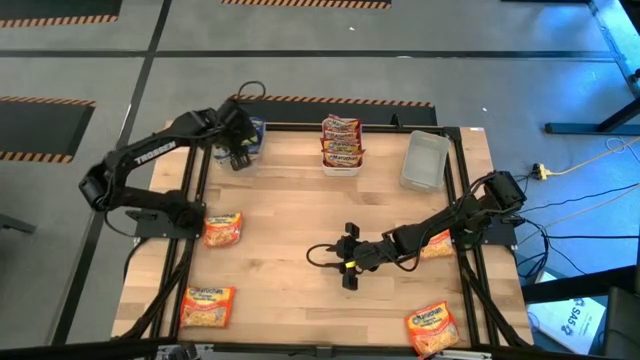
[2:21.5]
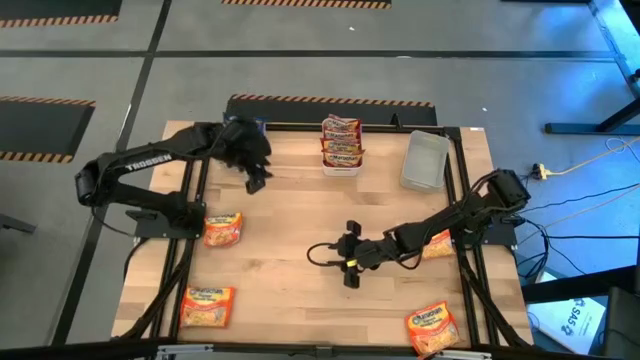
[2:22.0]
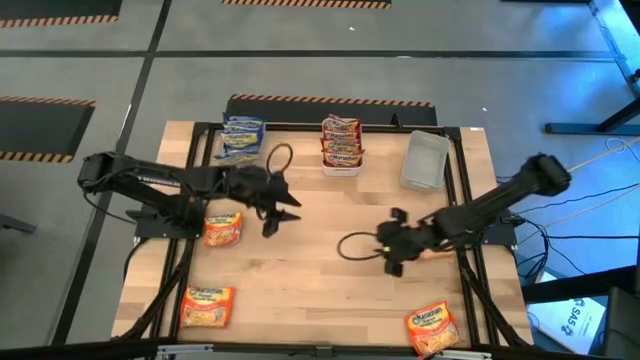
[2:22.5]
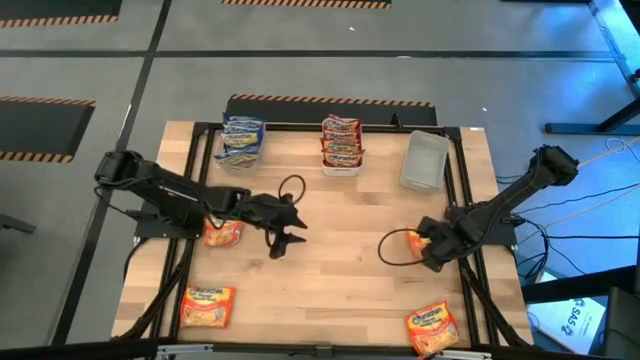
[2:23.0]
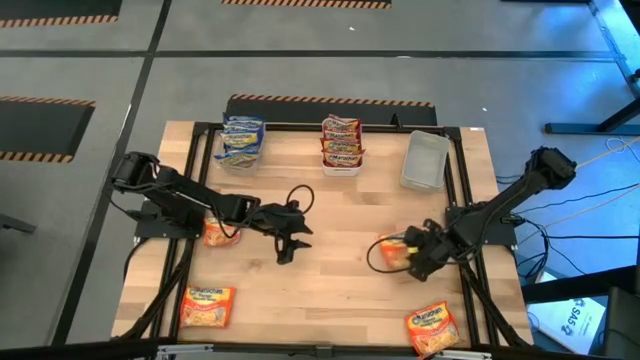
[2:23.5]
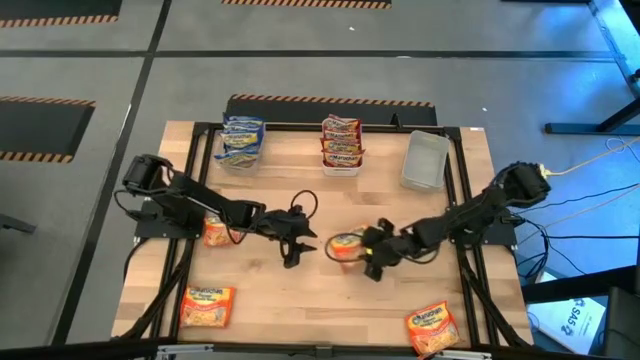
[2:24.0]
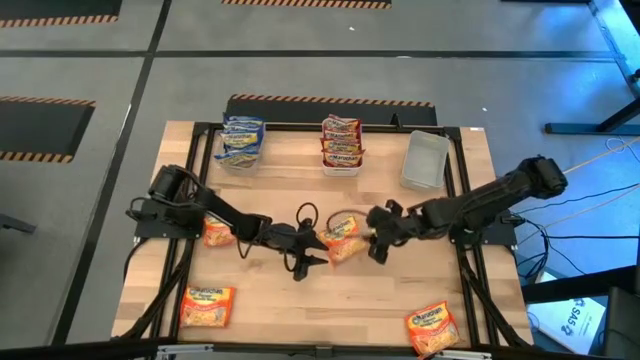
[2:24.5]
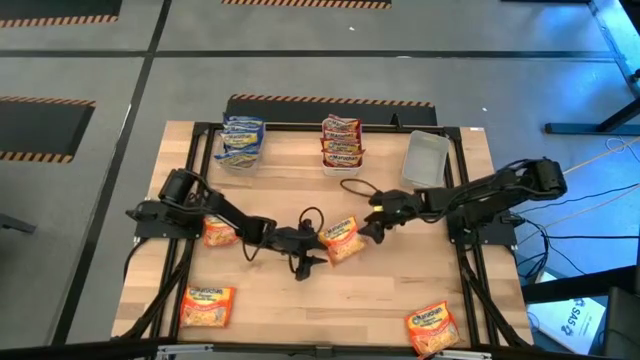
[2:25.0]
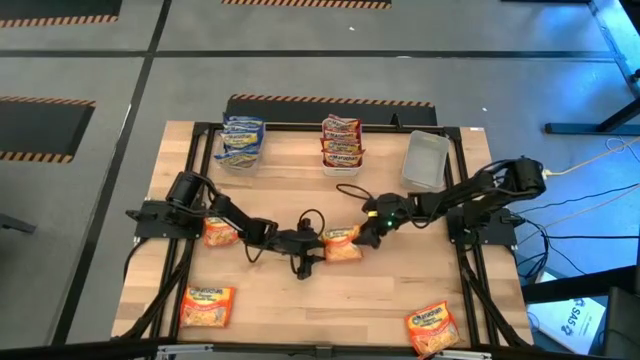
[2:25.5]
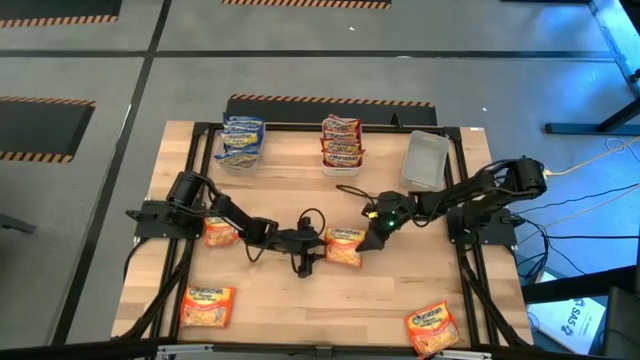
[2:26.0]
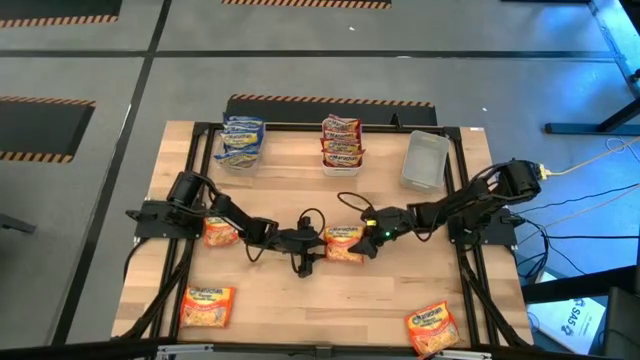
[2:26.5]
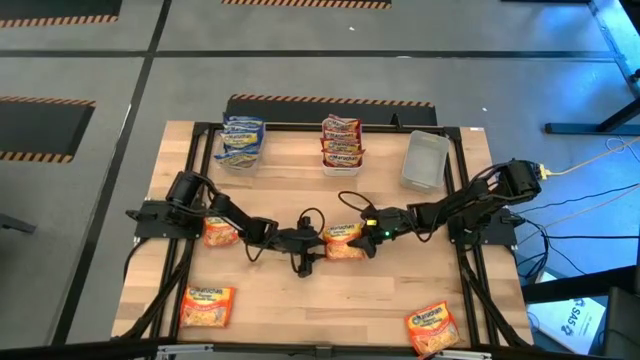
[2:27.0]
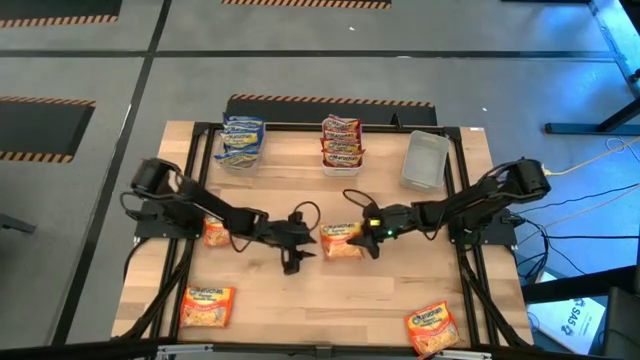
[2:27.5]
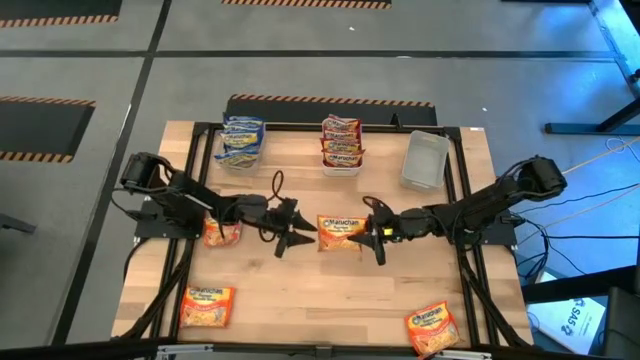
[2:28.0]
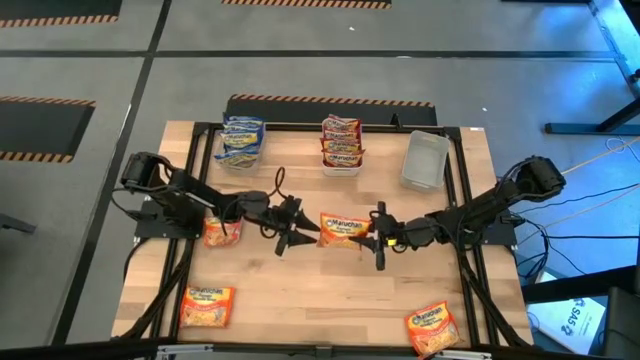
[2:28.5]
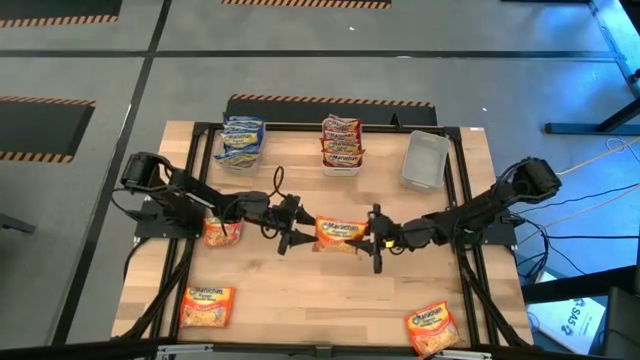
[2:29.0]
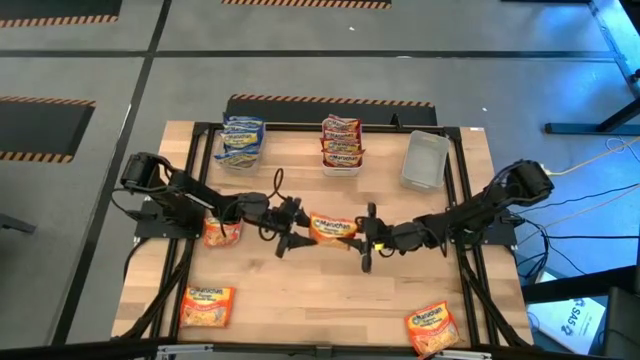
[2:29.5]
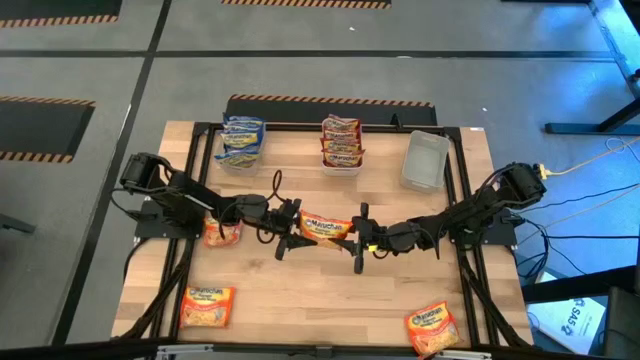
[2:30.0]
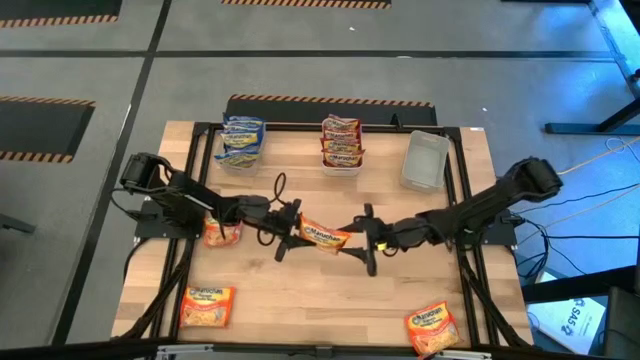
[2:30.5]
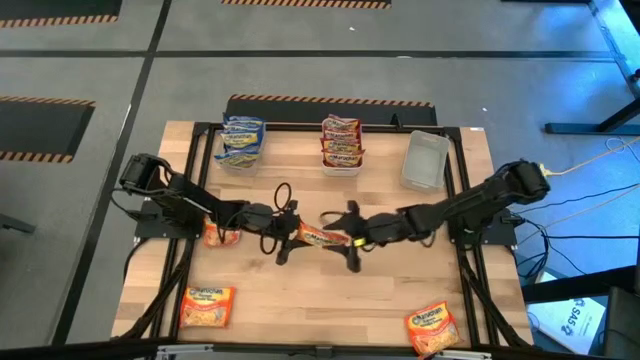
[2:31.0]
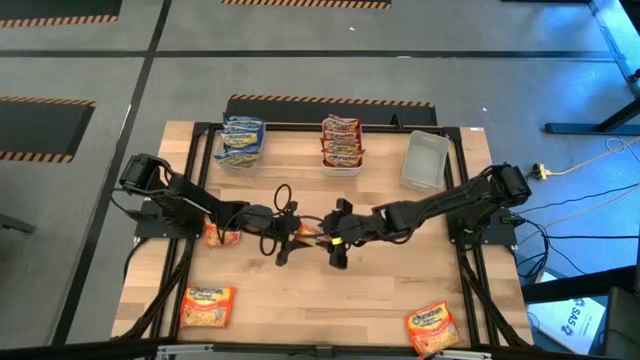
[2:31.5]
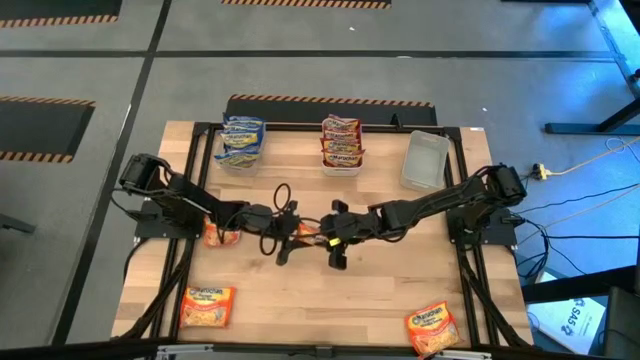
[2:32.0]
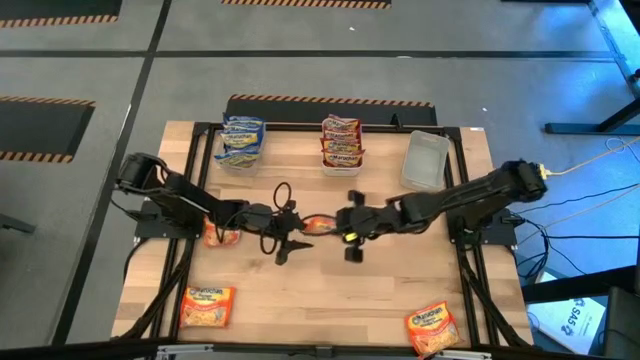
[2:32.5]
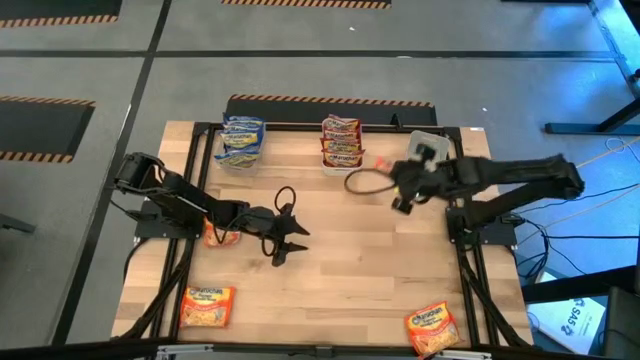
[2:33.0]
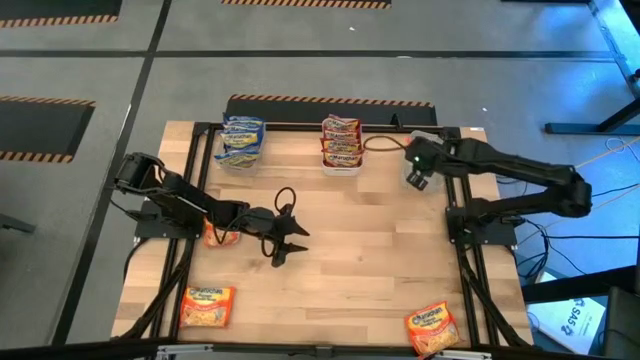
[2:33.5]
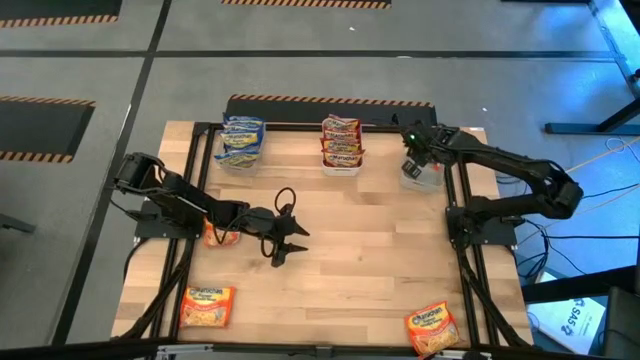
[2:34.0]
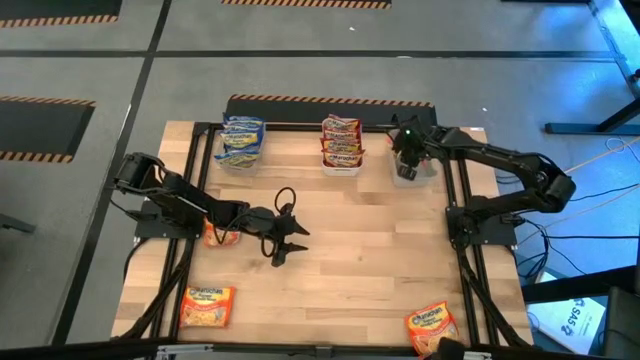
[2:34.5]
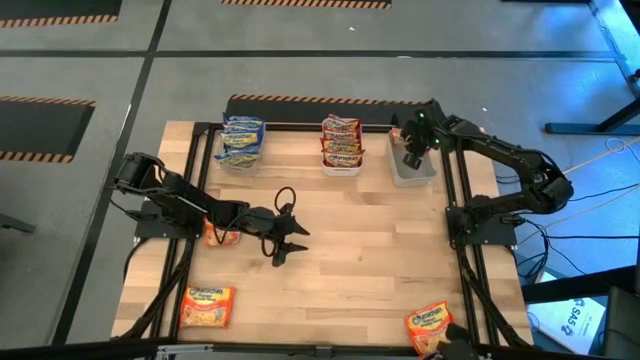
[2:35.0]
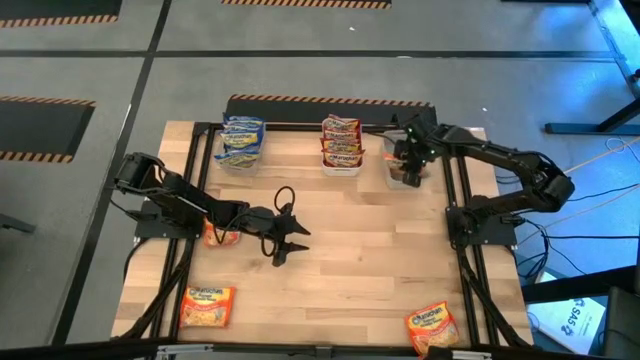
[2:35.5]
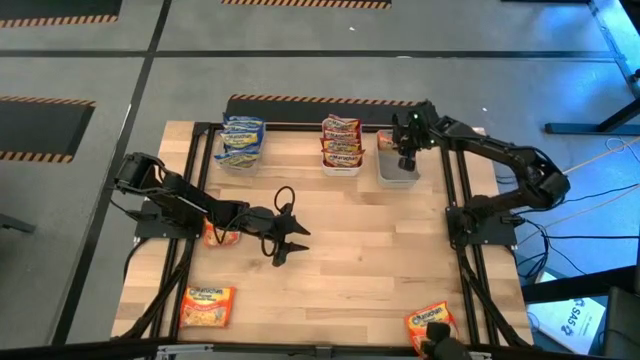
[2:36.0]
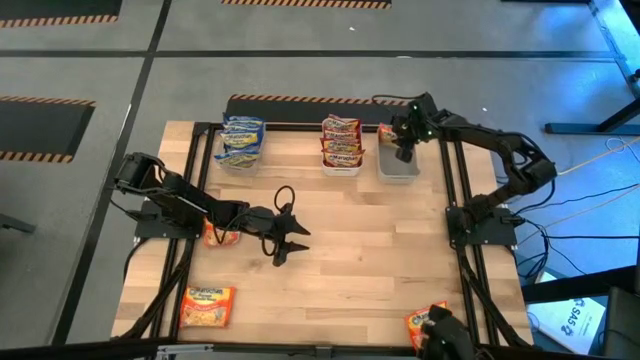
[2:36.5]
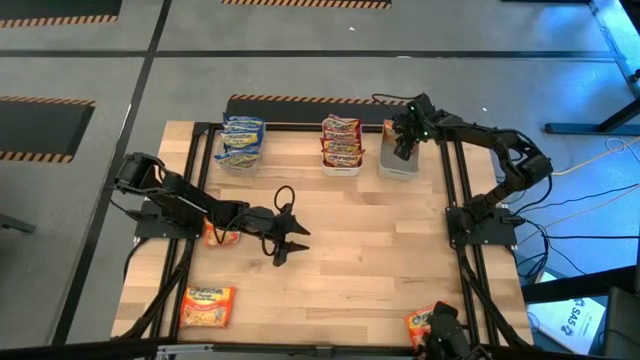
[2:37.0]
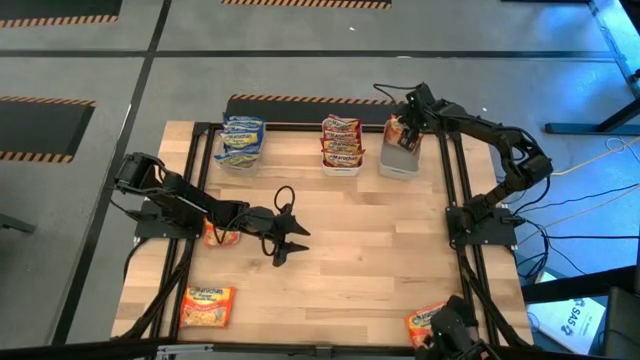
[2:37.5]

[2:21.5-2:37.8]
Task: Sort Maruchan noodles
Put the orange noodle pack into the gray bin

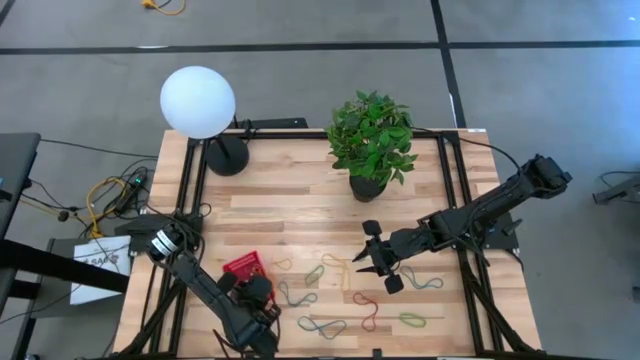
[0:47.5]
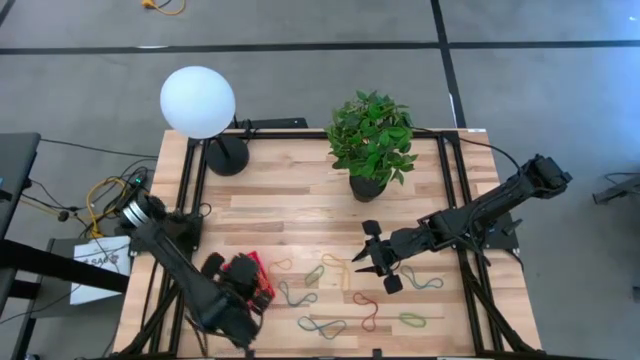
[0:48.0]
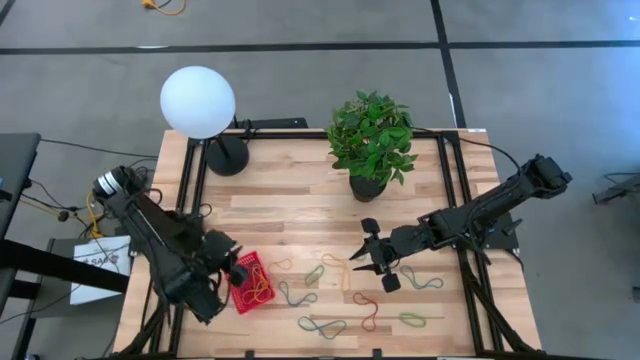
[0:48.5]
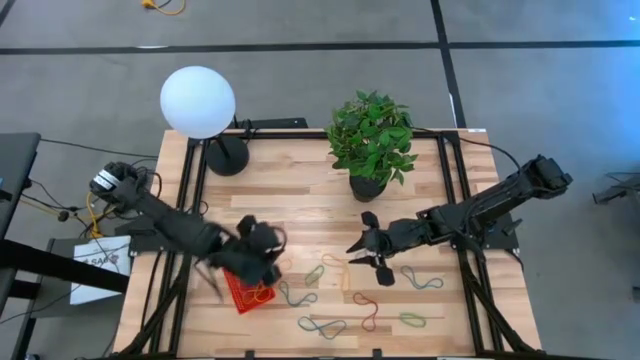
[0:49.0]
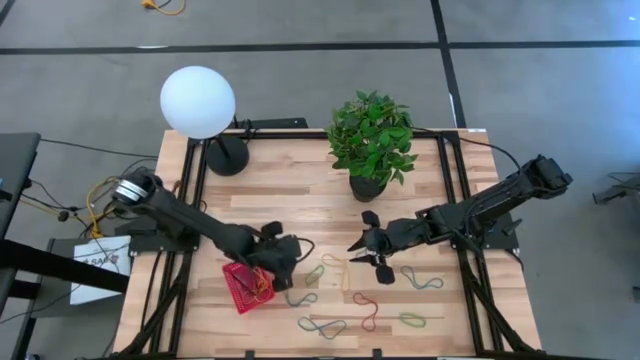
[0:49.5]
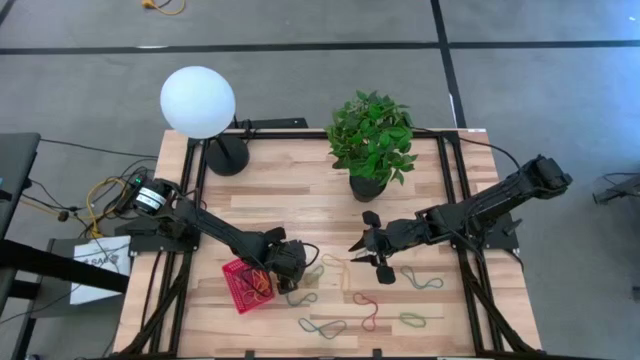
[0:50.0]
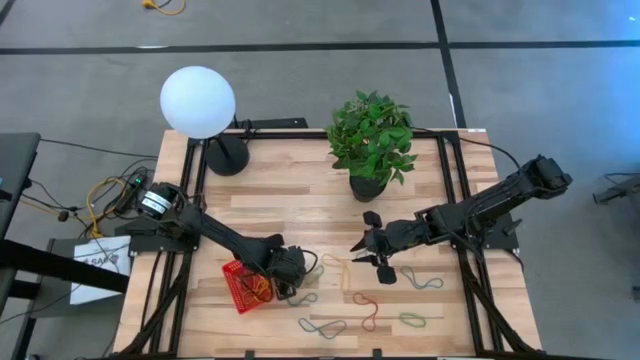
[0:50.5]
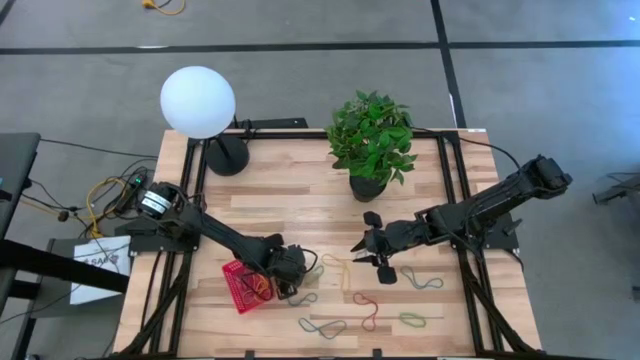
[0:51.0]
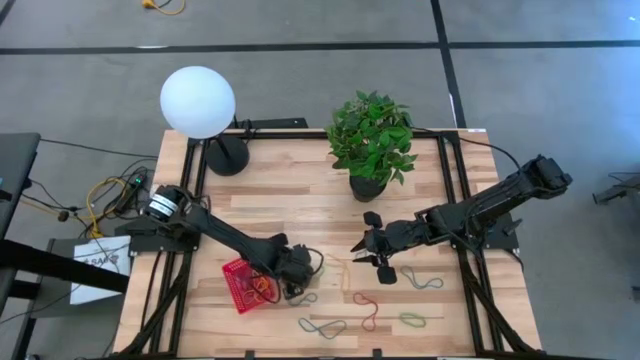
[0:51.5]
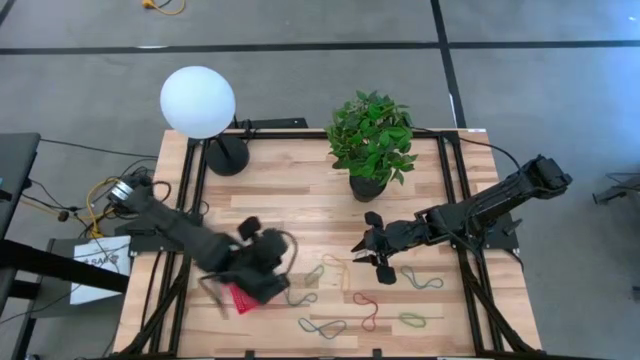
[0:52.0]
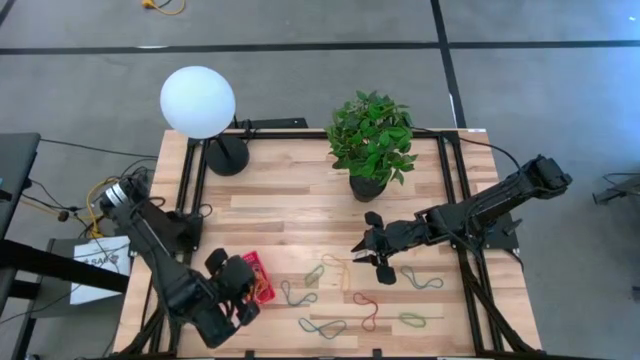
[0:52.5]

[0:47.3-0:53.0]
Task: Pick and place items into bin
Put the yellow rubber band into the red bin
